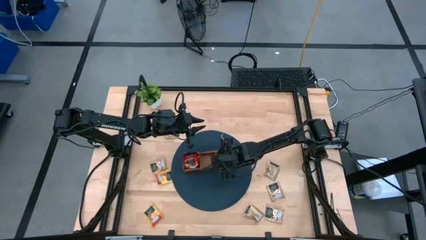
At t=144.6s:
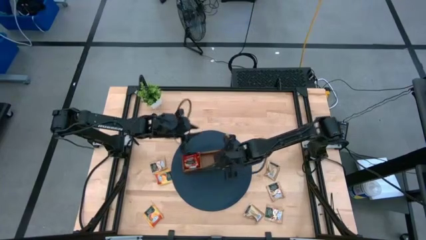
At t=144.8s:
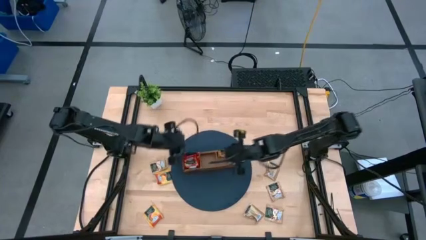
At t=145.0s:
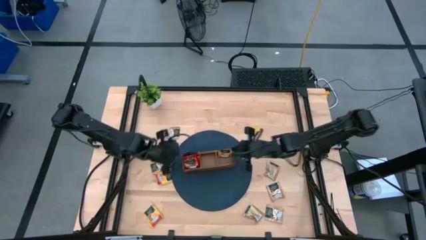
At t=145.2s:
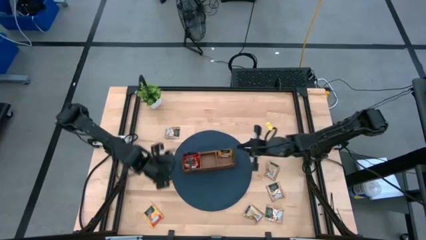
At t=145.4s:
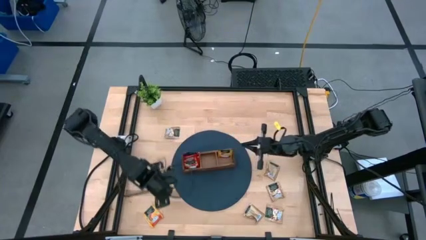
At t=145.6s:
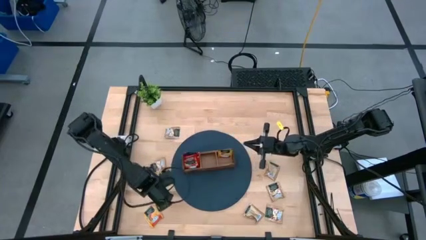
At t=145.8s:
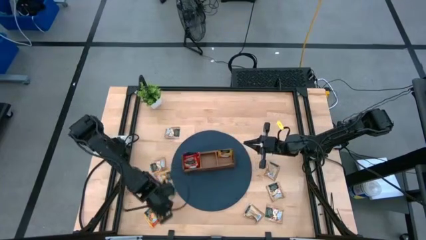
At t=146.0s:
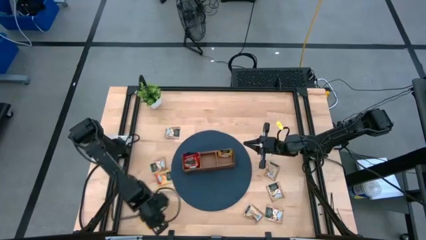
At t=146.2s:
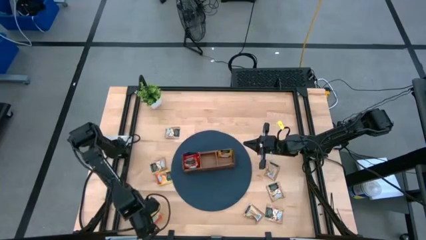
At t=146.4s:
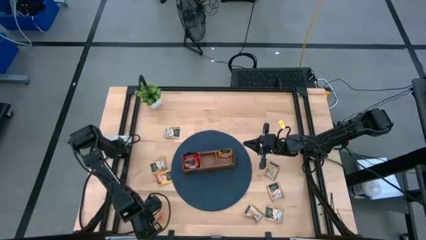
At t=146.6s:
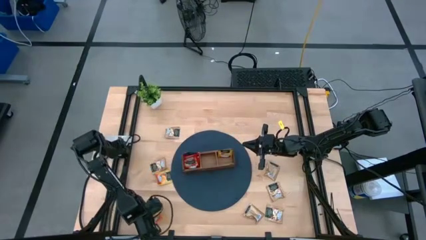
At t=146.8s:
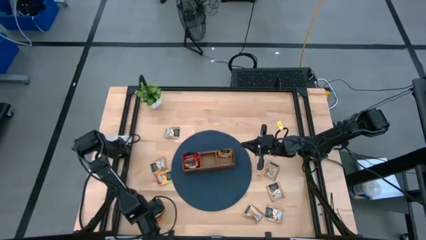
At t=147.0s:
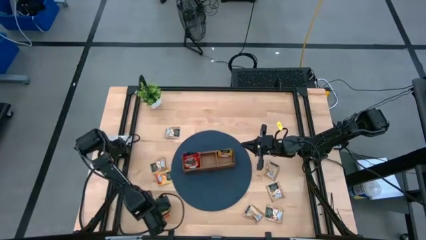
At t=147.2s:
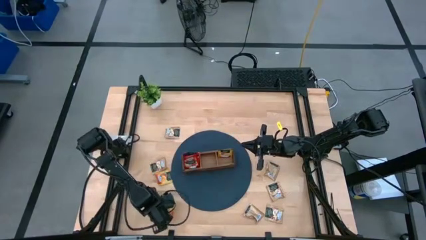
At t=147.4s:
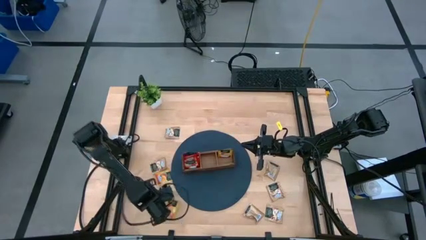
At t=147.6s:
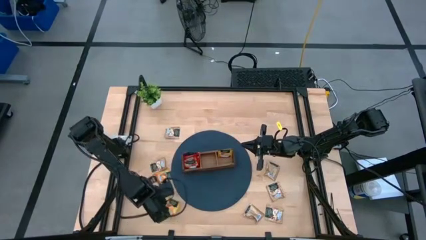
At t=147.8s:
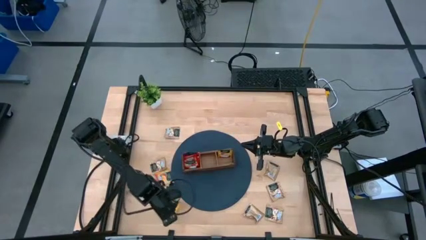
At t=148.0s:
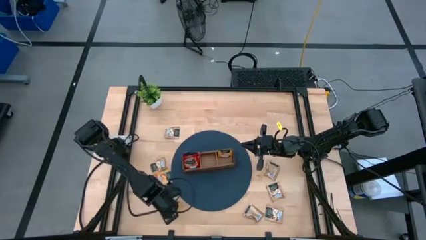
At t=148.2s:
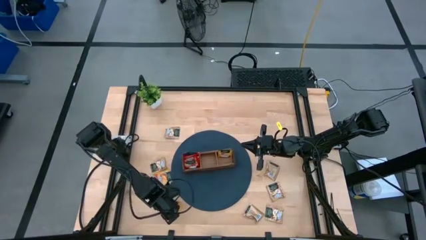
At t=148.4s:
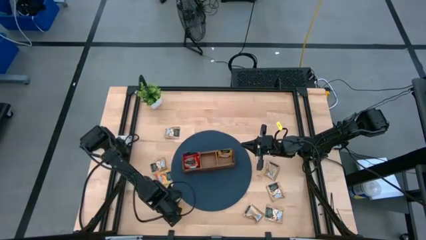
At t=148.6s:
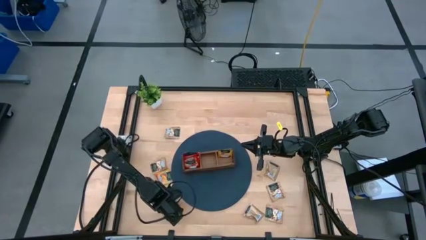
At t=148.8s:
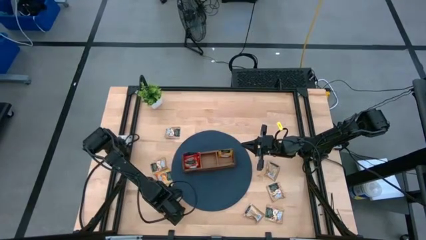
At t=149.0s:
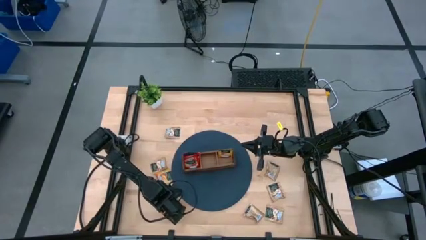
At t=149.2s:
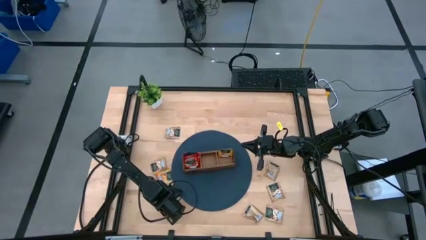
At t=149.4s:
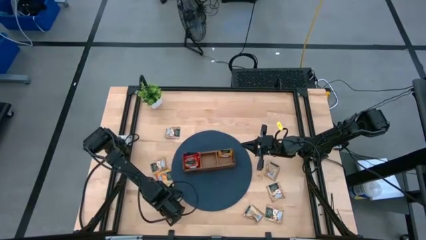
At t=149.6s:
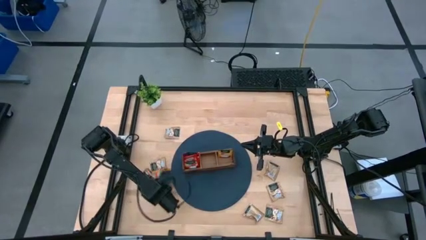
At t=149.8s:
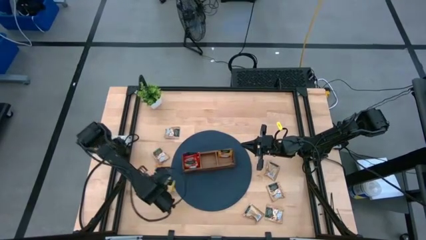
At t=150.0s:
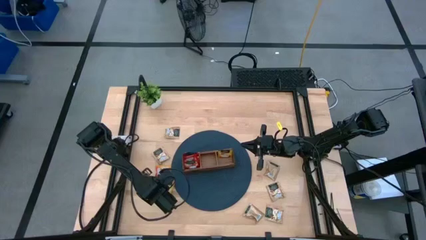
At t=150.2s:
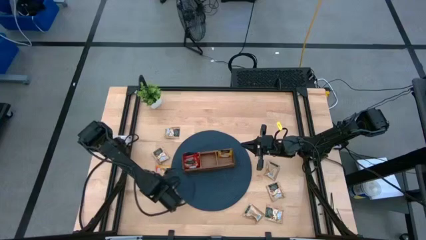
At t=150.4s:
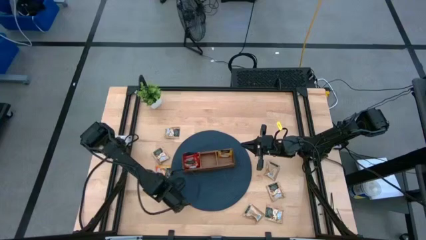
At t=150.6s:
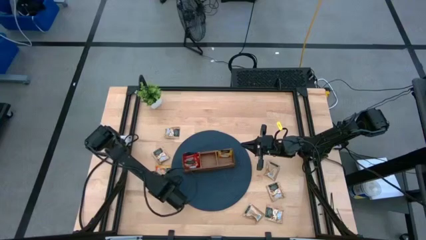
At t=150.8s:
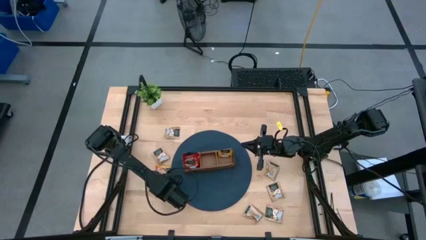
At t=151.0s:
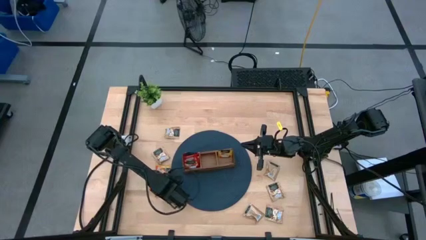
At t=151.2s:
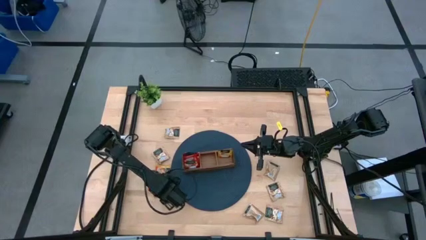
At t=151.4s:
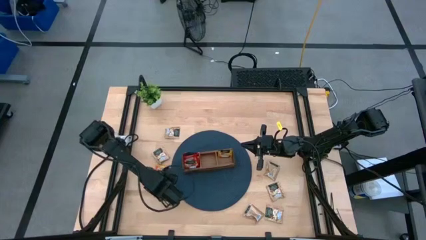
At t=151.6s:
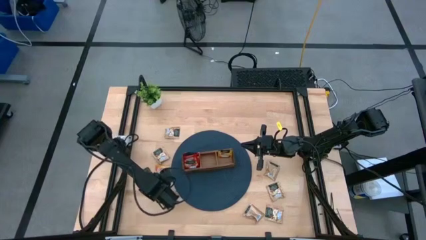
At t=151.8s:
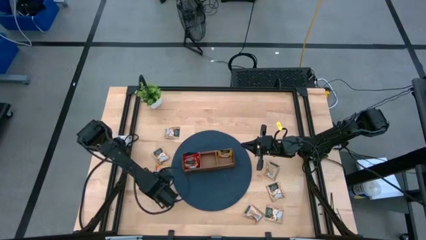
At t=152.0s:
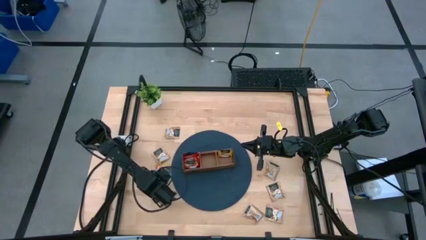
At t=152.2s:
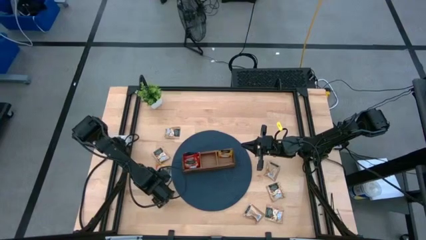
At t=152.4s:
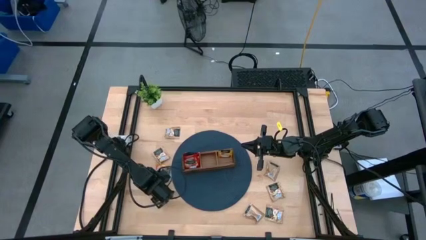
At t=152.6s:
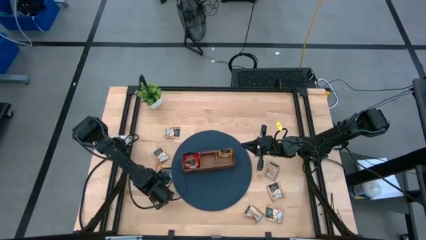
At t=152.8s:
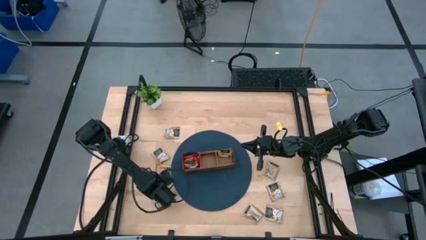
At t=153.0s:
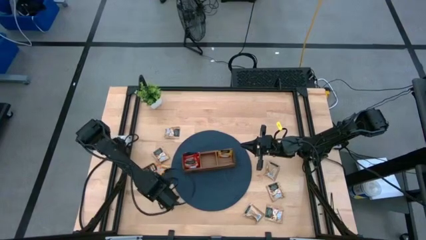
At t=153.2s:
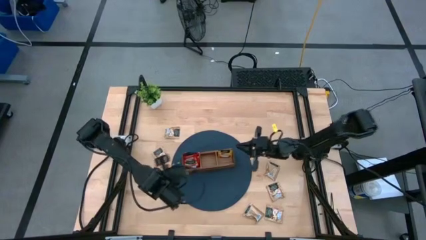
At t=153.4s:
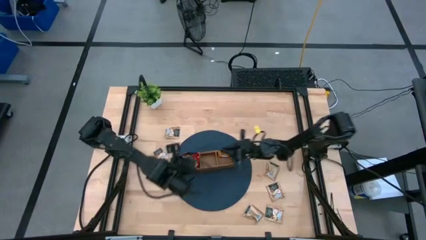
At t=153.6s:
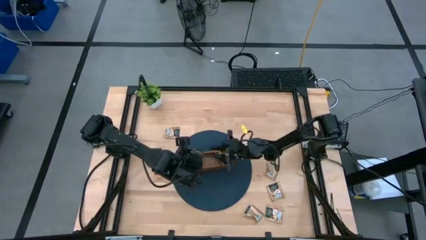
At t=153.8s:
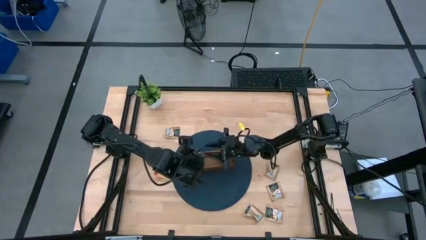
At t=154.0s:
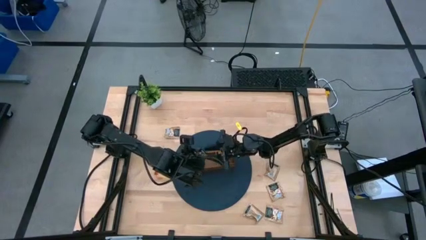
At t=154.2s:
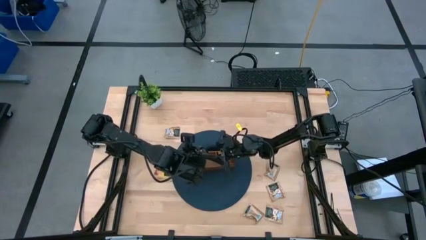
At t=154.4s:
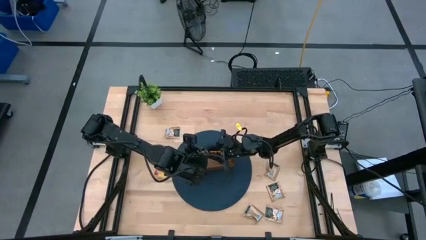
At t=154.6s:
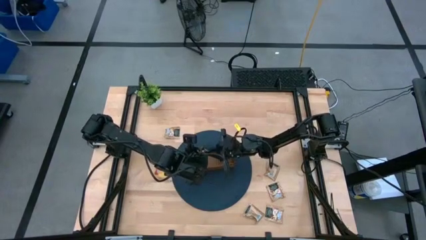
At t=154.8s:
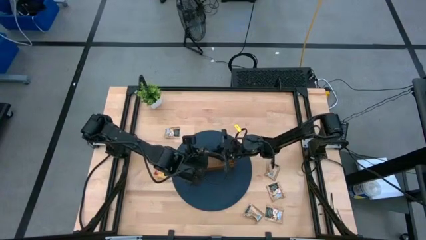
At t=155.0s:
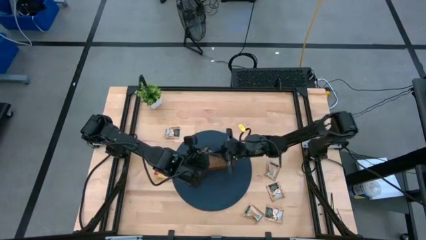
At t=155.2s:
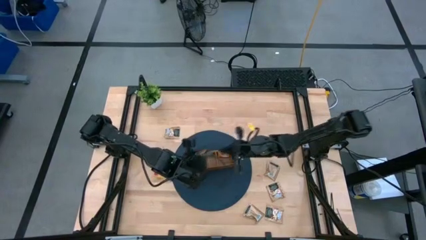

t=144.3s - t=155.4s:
Task: Pick & Place Tea
Put the bottom yellow tea bag into the right section of the wooden organizer

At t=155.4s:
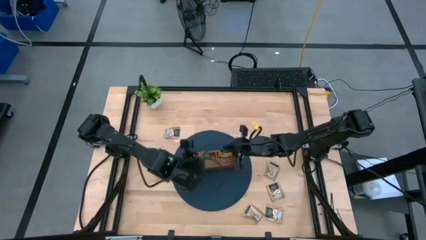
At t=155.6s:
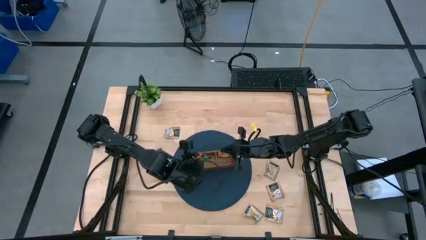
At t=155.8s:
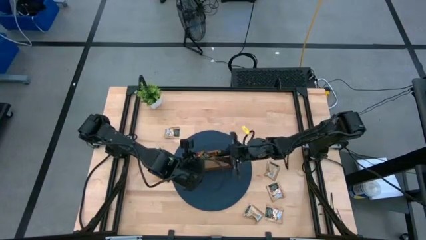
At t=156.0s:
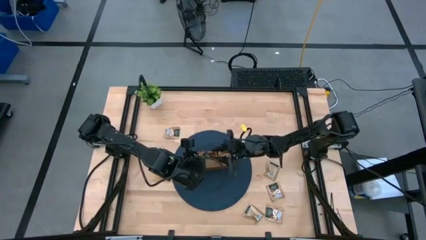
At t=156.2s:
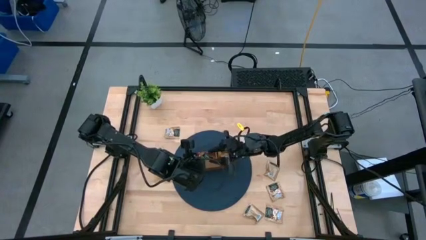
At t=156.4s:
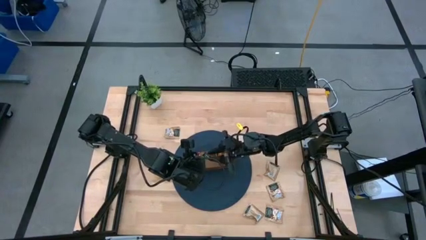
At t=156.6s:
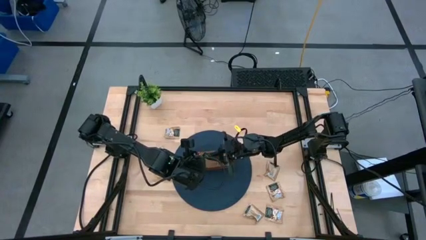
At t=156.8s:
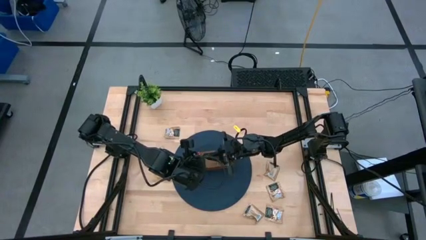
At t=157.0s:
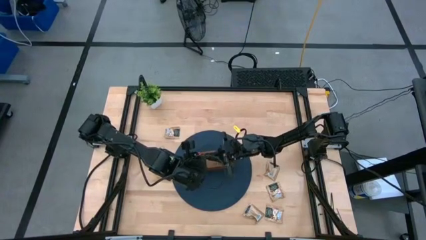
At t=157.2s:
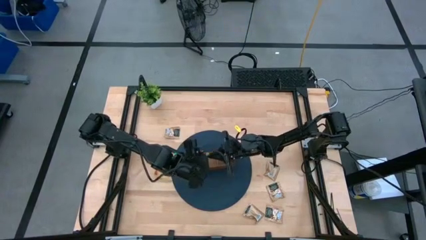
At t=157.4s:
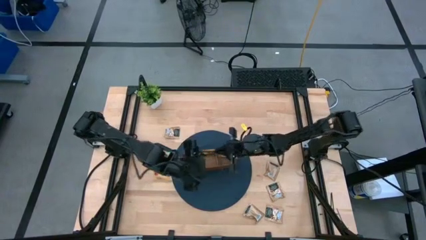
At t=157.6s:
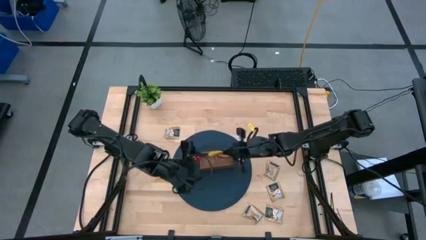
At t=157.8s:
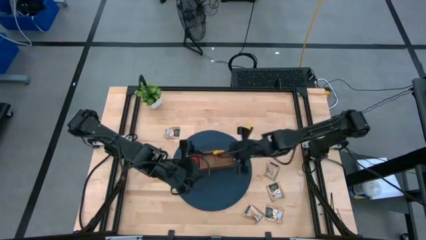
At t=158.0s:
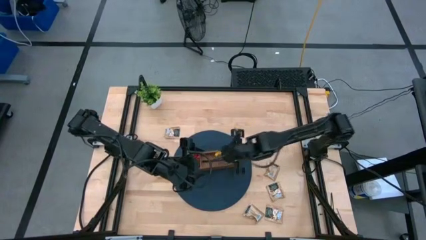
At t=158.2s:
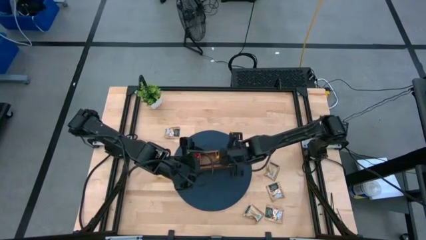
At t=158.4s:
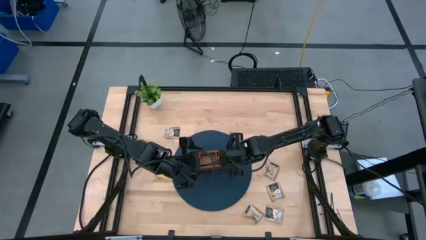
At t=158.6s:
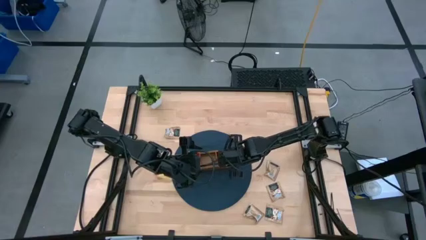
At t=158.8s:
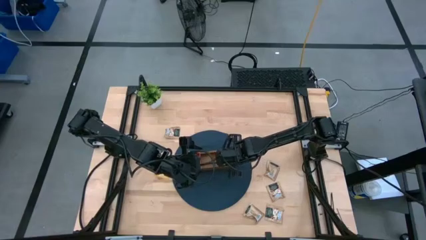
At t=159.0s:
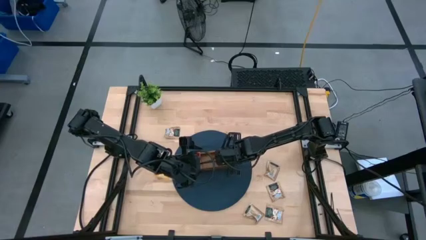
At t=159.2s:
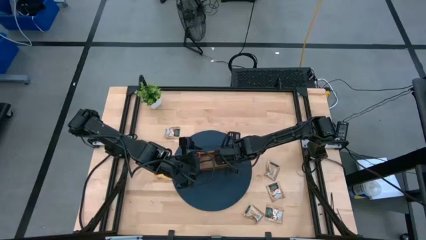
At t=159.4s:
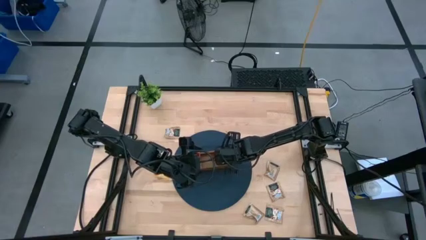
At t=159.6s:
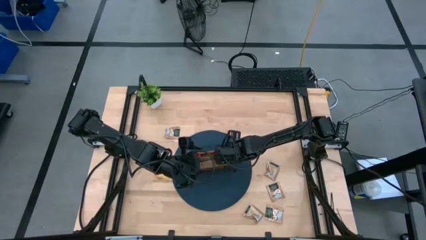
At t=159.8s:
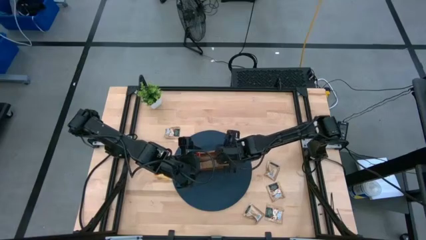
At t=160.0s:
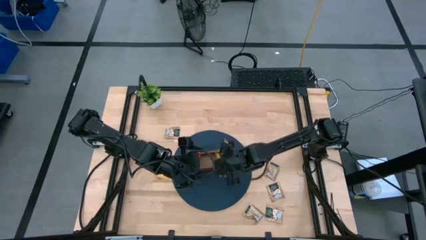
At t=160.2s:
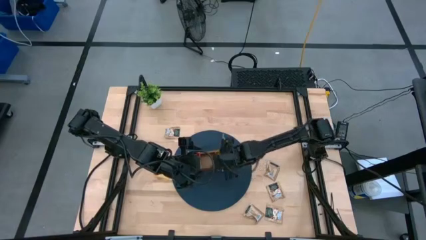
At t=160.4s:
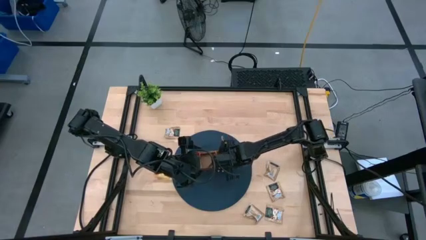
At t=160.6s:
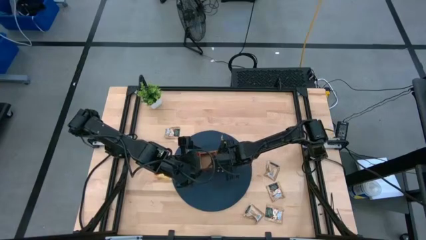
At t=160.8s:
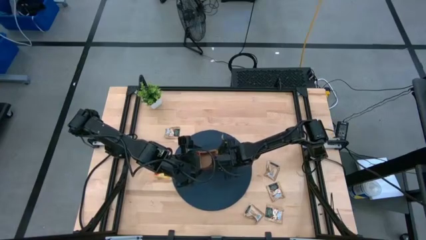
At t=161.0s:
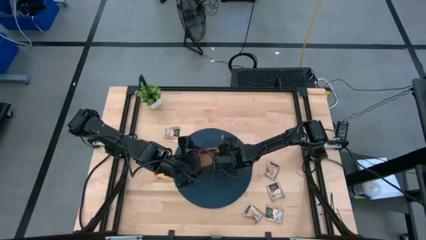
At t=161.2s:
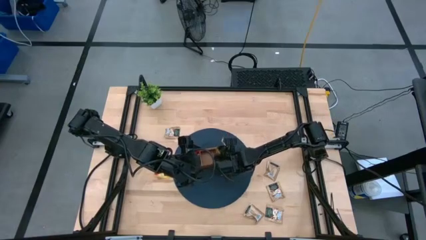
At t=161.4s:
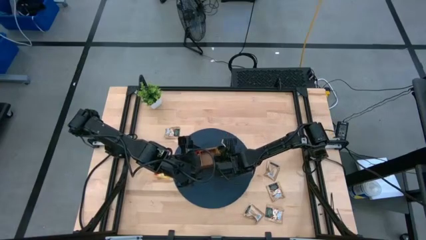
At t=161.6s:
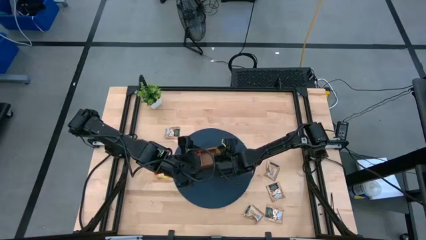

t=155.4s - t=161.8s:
Put the bottom yellow tea bag into the right section of the wooden organizer
